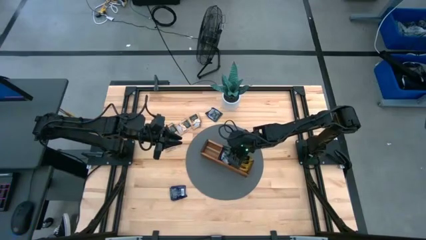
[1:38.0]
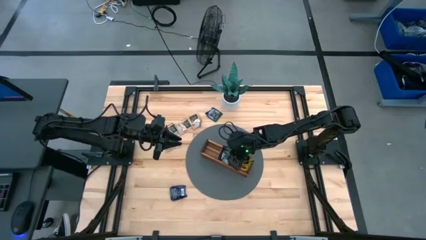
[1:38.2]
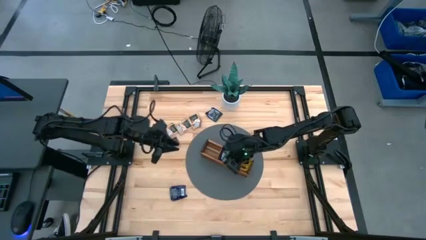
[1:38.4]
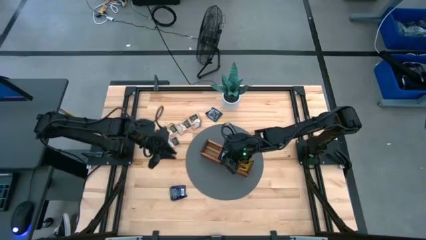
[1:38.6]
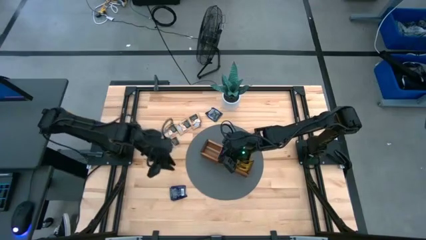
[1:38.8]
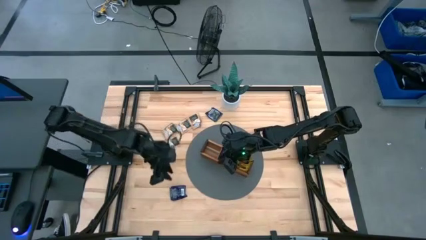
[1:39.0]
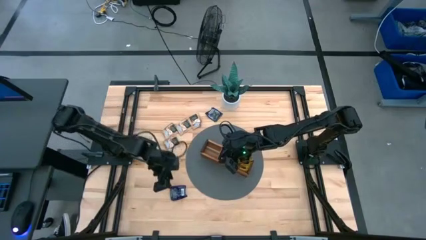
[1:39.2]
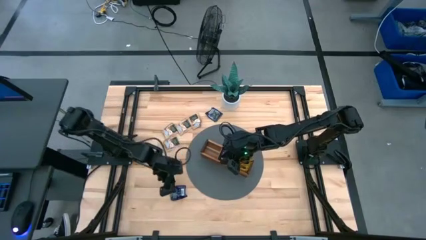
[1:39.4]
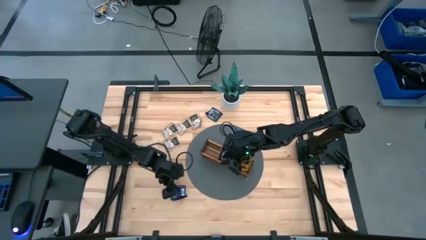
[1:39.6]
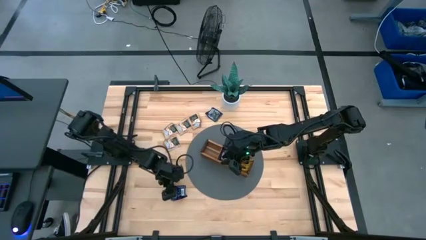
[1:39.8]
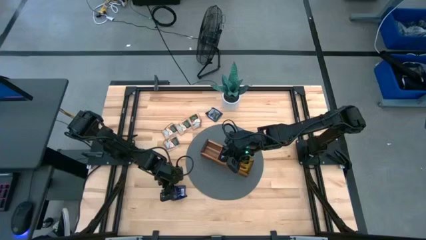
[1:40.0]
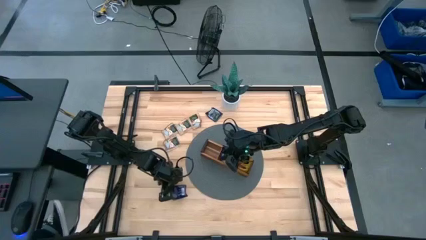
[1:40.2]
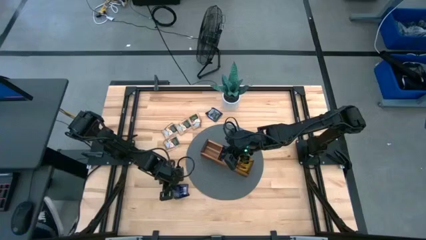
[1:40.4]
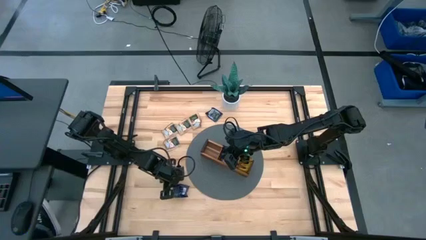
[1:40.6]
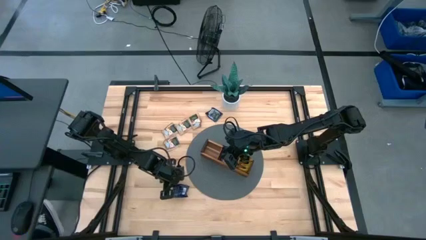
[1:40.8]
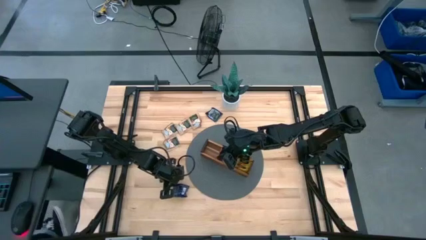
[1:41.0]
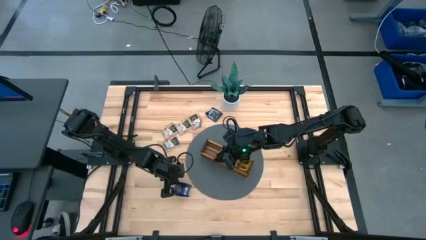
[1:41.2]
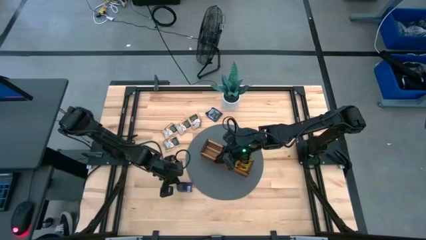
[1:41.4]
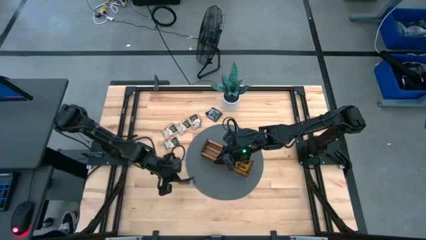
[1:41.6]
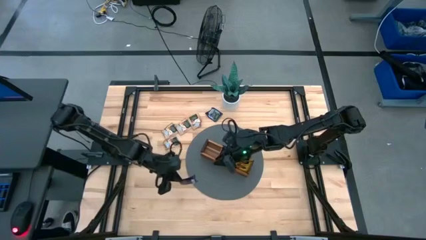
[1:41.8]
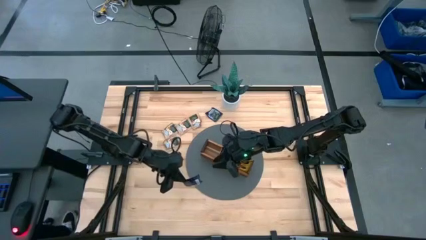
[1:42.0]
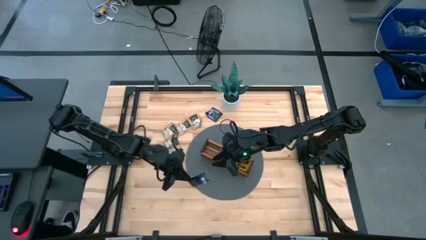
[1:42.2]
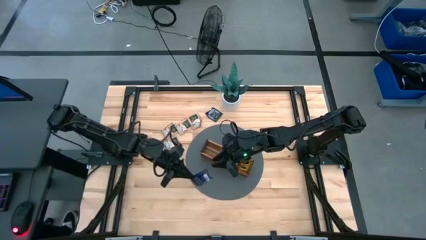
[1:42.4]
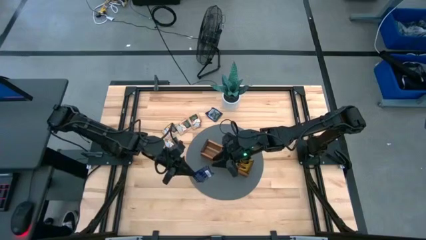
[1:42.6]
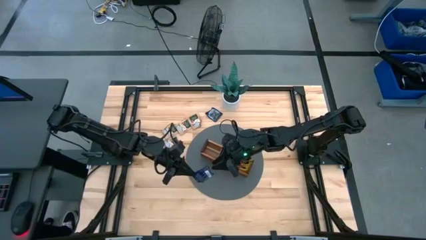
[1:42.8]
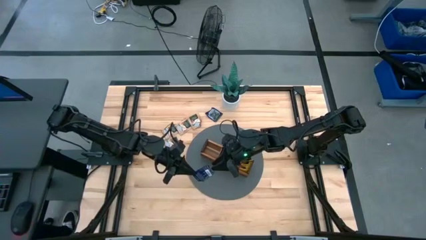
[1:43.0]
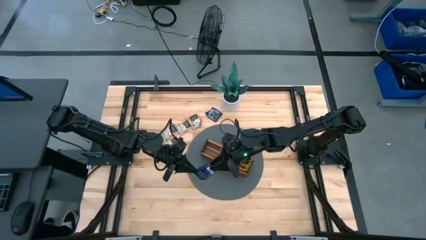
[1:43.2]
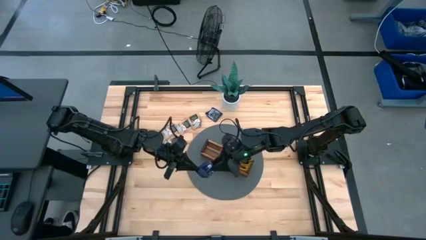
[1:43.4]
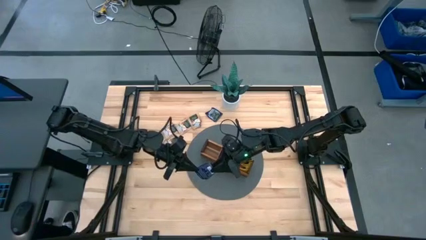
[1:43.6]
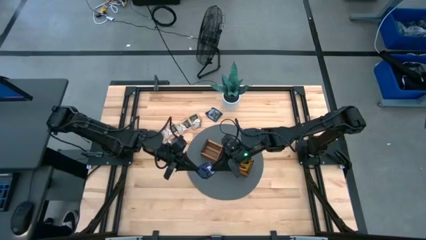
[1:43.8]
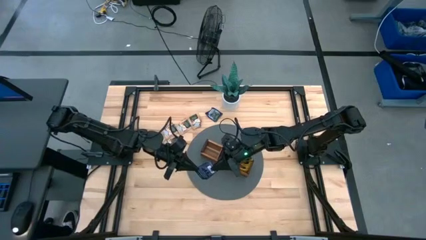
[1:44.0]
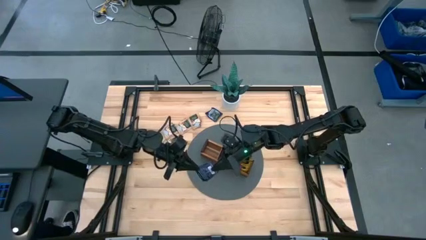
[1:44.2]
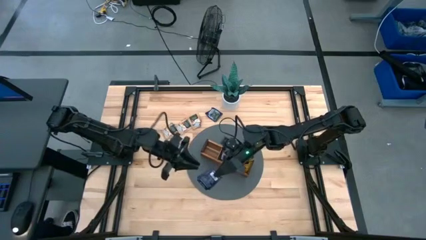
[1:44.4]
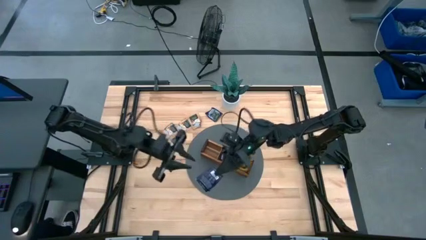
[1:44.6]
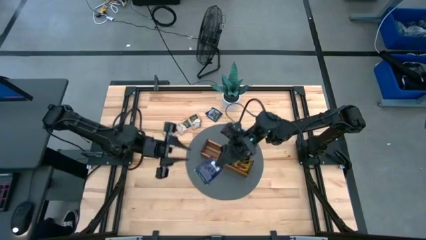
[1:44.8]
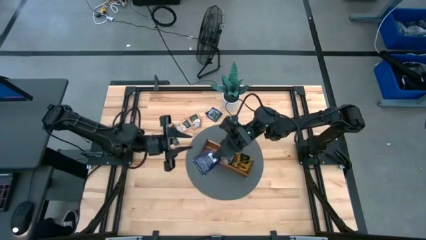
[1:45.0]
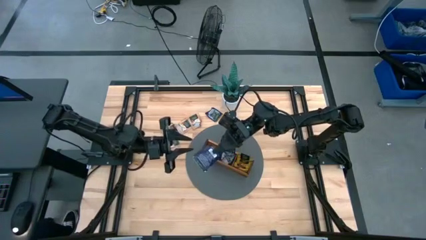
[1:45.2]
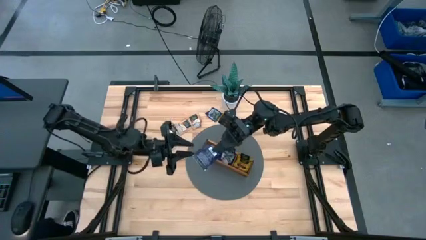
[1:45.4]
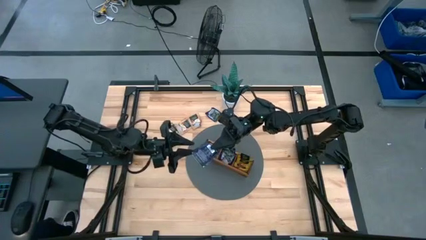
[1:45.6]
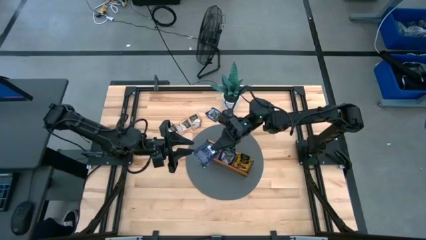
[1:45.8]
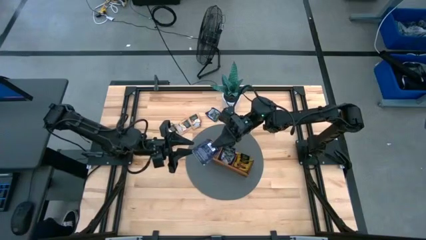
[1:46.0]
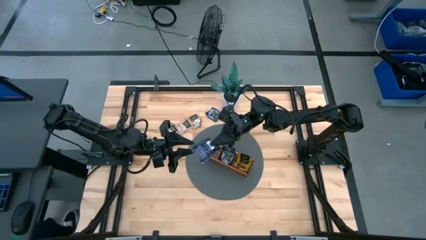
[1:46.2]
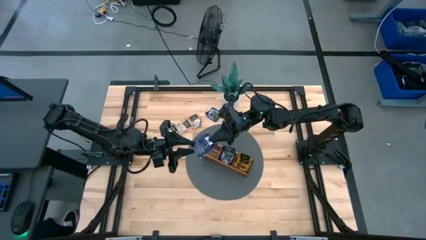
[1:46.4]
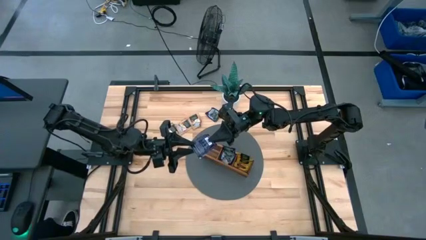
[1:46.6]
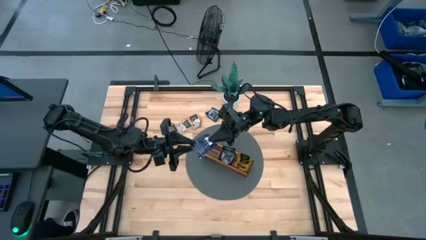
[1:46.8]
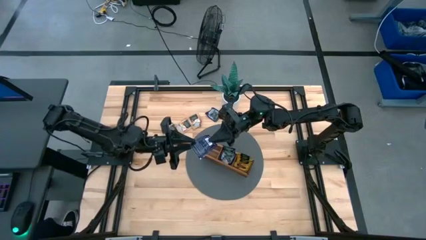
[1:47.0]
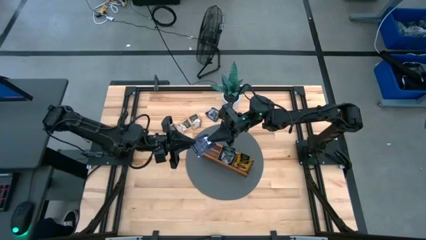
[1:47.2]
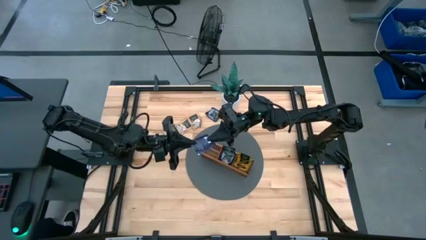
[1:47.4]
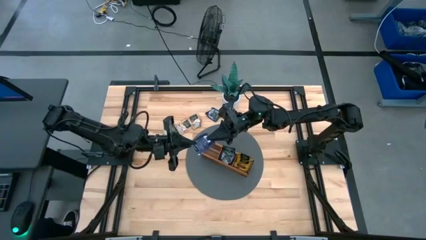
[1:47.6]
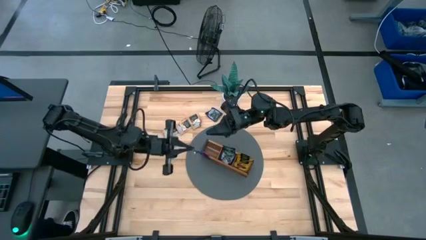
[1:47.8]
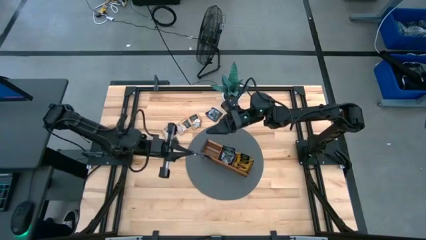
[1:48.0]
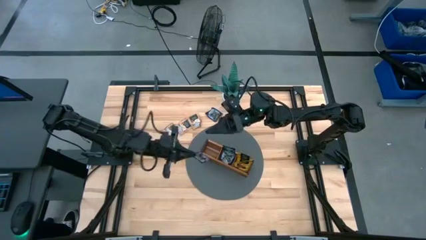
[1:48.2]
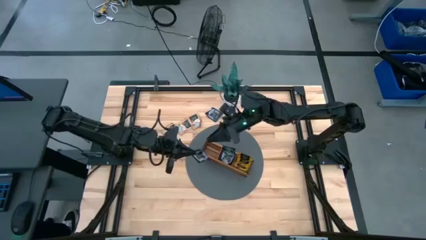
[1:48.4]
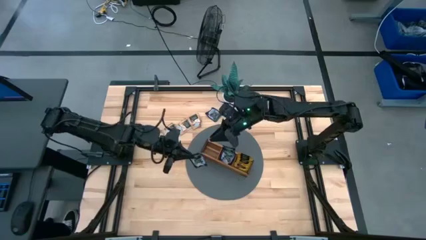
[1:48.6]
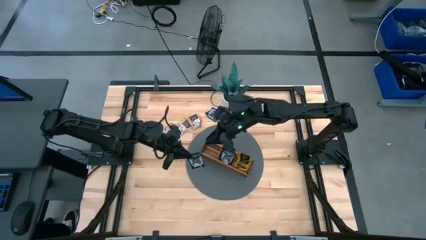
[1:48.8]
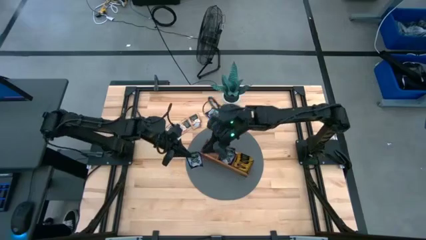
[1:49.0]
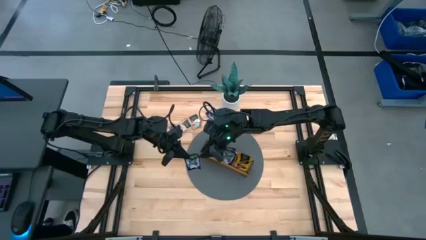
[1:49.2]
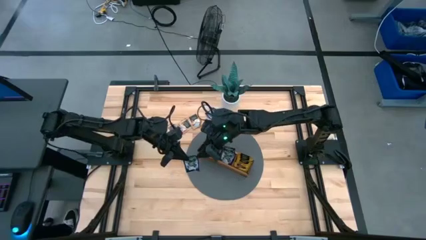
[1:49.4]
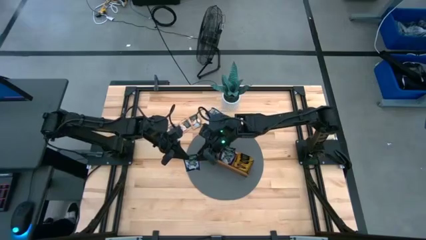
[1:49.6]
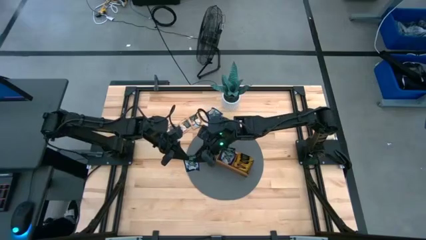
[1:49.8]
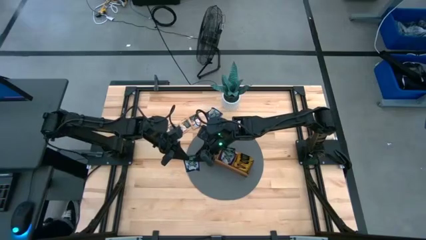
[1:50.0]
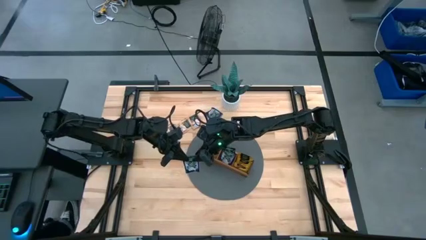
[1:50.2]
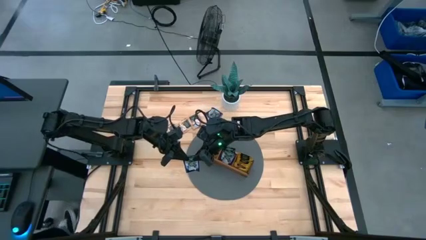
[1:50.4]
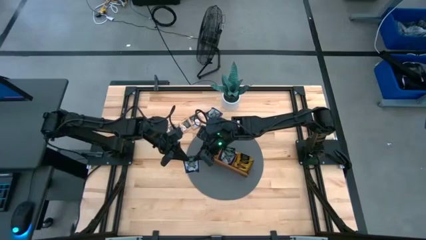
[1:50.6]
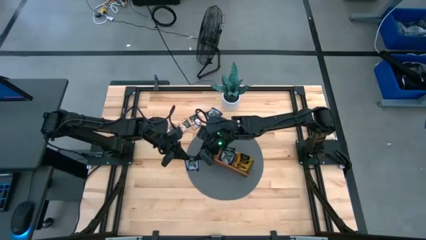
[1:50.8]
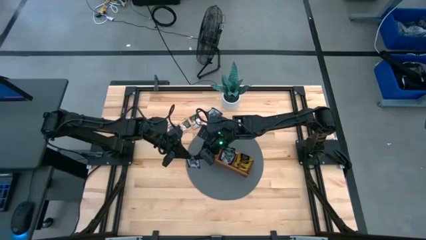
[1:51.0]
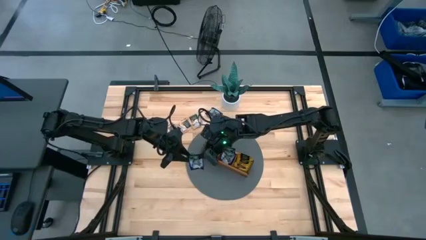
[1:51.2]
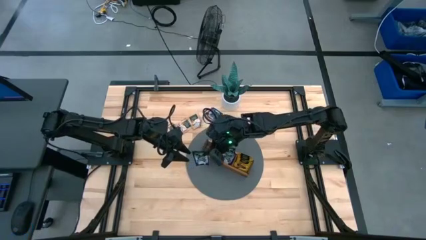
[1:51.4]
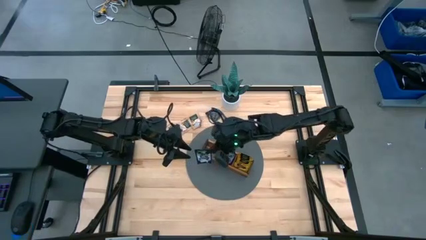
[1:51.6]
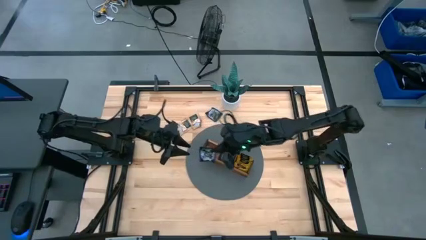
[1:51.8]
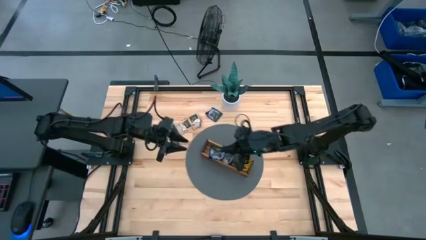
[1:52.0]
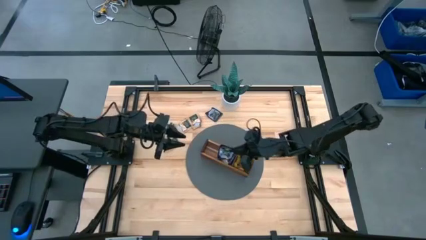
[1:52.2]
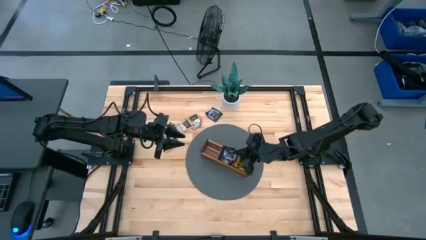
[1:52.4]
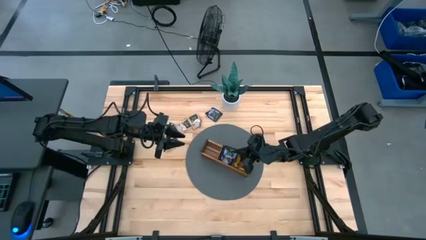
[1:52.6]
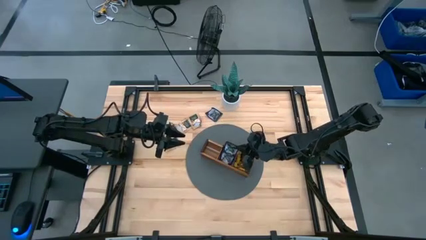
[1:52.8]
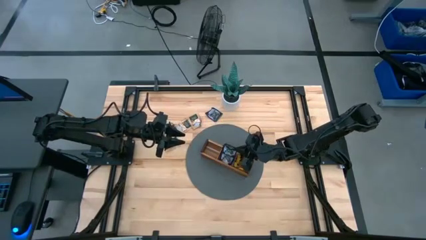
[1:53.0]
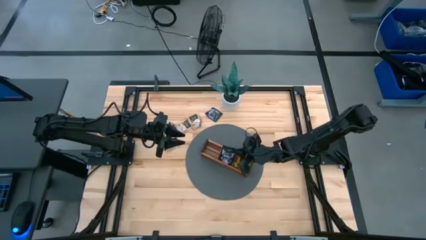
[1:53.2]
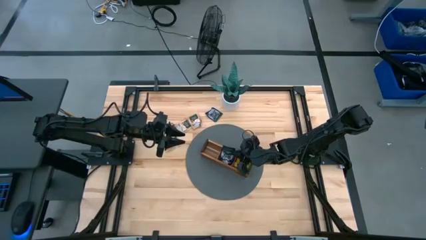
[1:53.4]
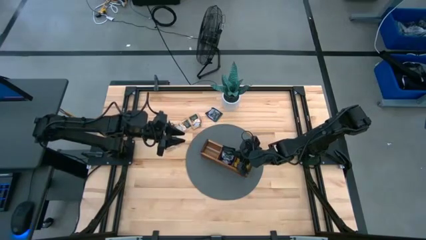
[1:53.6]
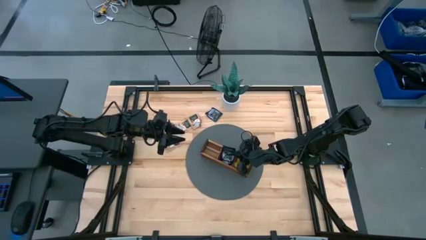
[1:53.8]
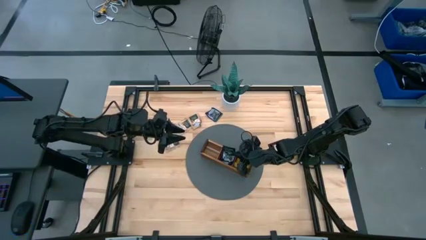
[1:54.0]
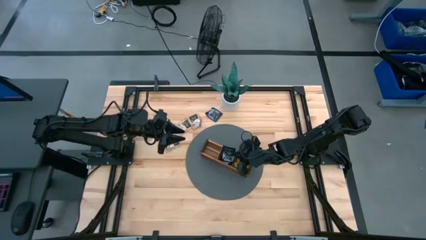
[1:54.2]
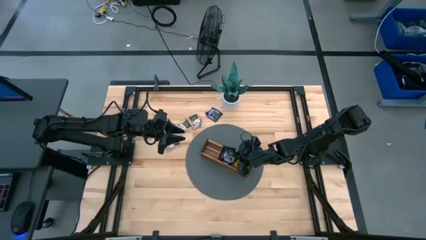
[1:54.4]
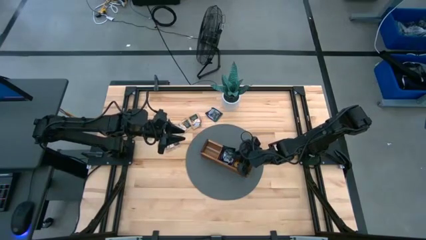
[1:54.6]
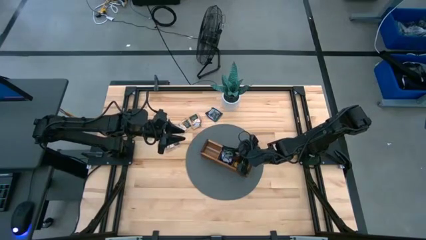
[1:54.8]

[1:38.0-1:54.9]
Task: Pick & Place Tea
Put the violet tea bag into the middle section of the wooden organizer
